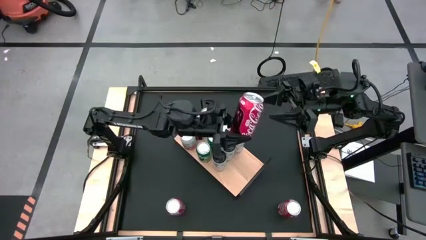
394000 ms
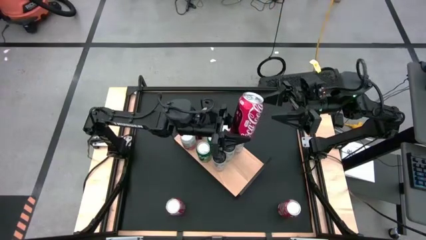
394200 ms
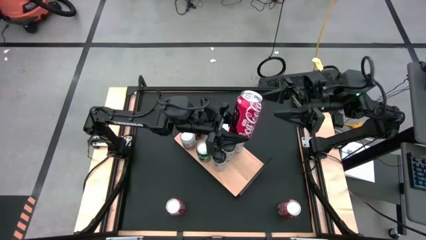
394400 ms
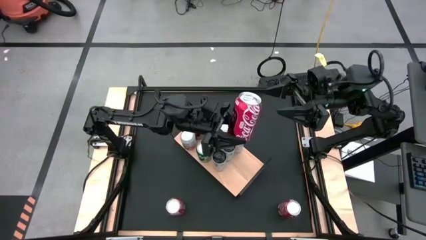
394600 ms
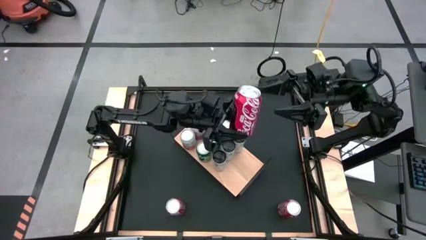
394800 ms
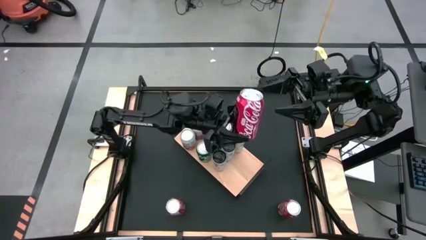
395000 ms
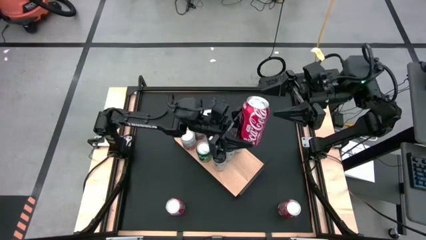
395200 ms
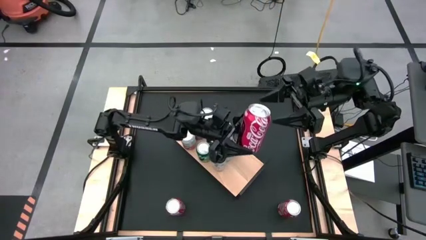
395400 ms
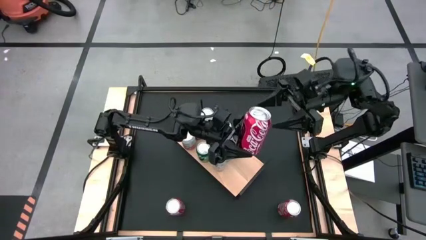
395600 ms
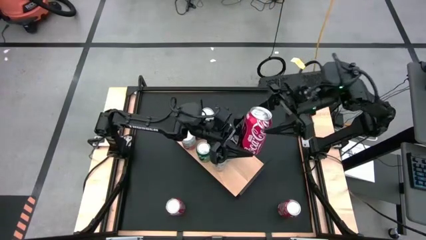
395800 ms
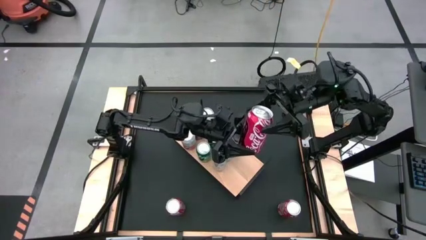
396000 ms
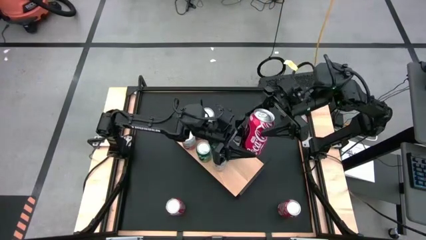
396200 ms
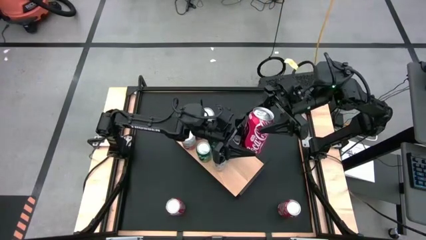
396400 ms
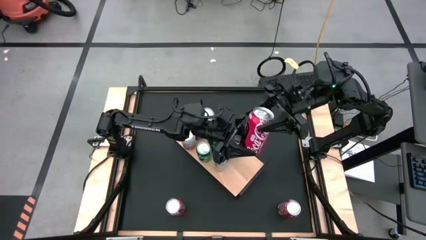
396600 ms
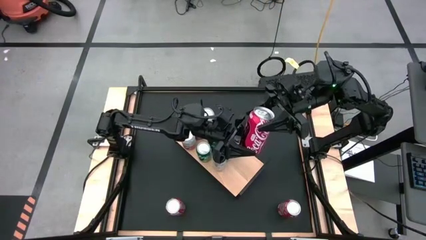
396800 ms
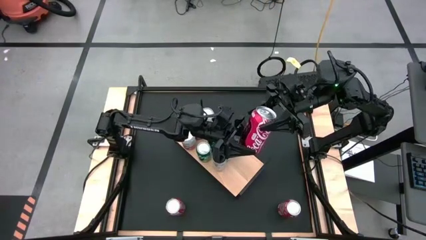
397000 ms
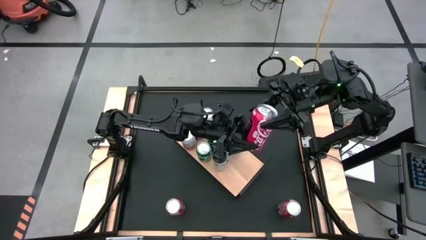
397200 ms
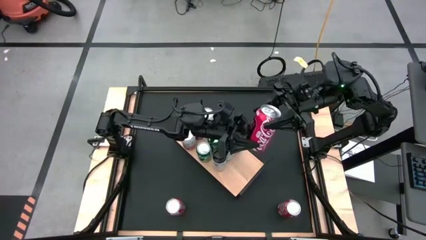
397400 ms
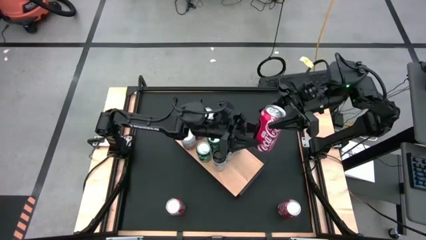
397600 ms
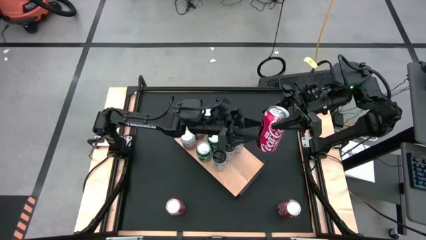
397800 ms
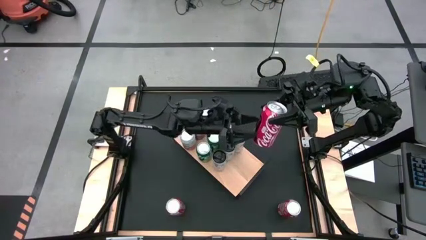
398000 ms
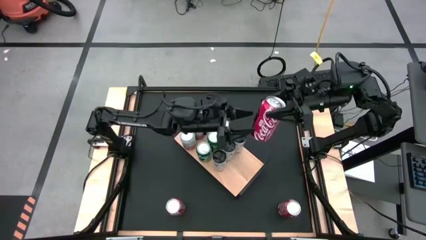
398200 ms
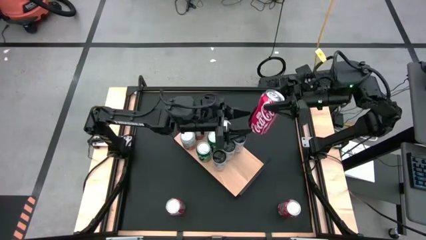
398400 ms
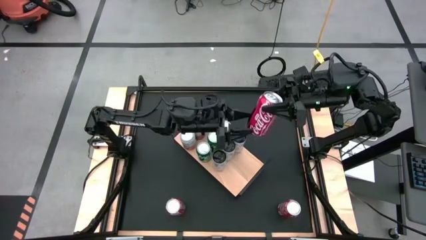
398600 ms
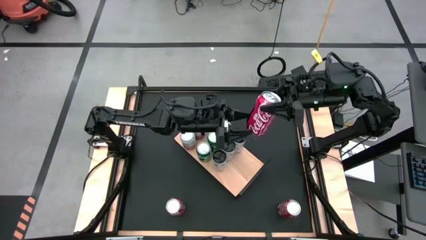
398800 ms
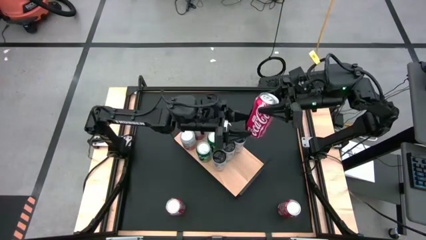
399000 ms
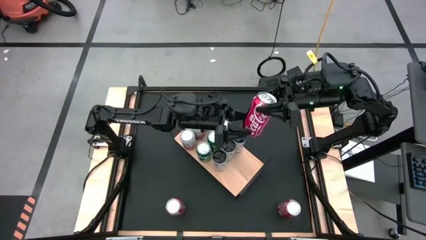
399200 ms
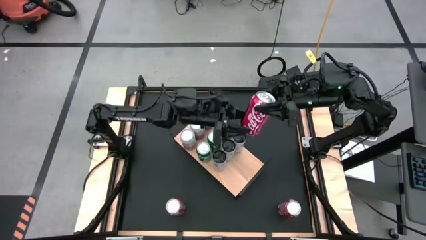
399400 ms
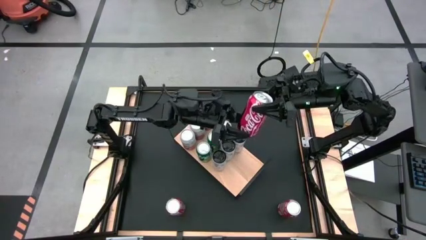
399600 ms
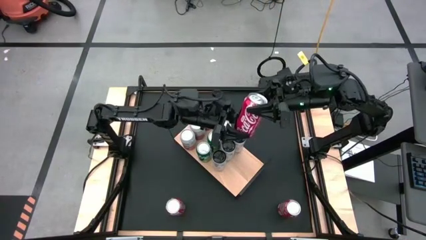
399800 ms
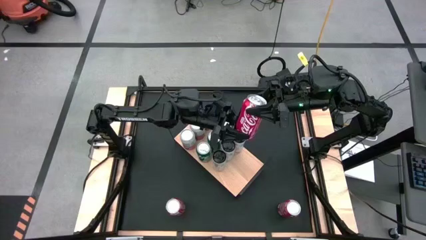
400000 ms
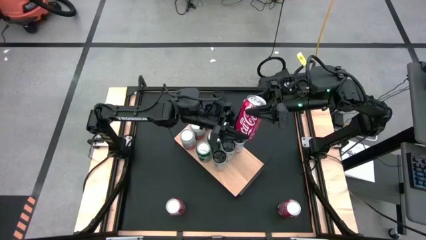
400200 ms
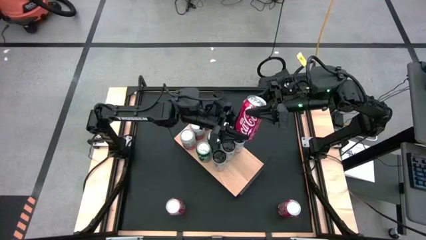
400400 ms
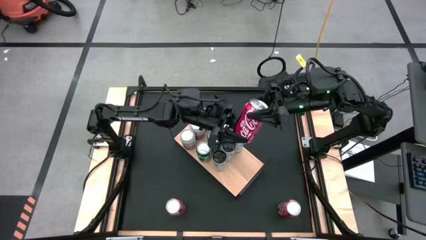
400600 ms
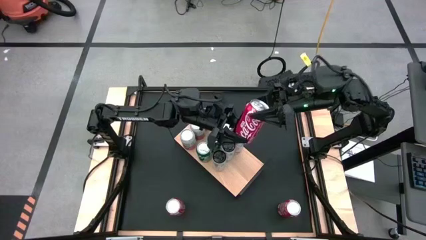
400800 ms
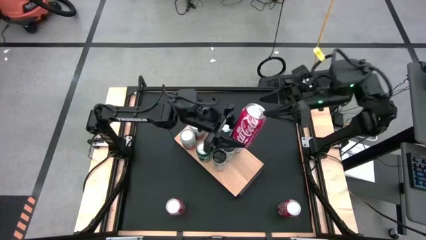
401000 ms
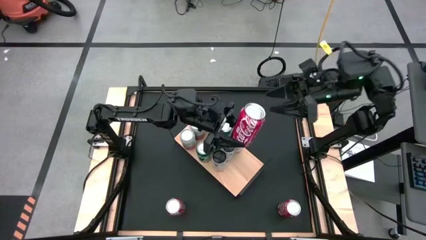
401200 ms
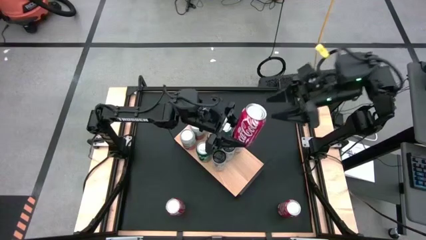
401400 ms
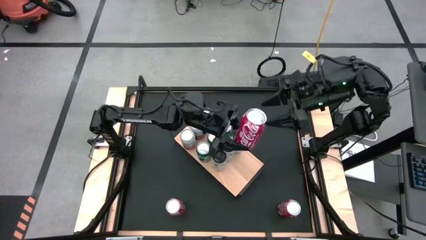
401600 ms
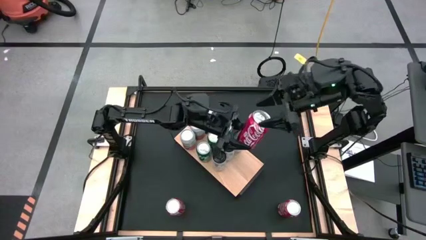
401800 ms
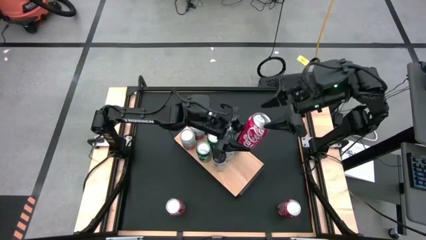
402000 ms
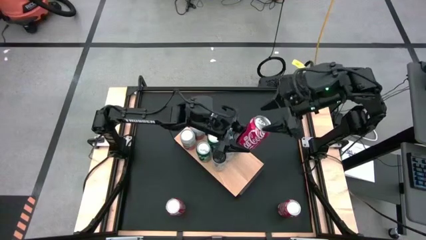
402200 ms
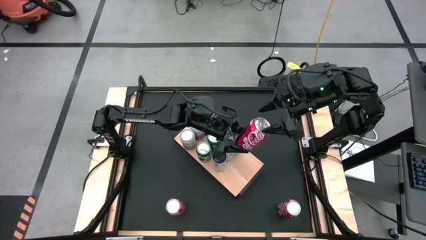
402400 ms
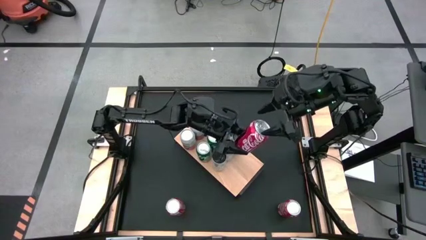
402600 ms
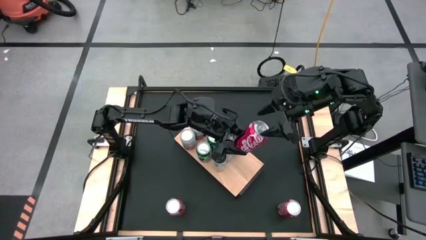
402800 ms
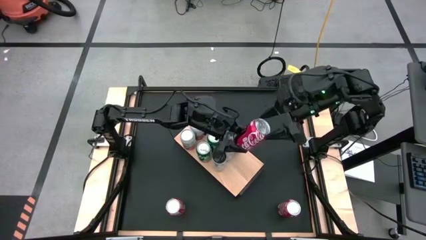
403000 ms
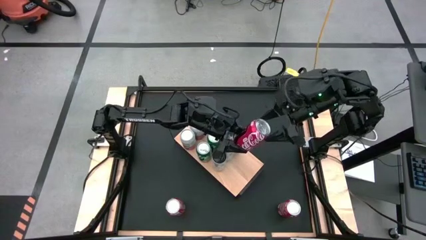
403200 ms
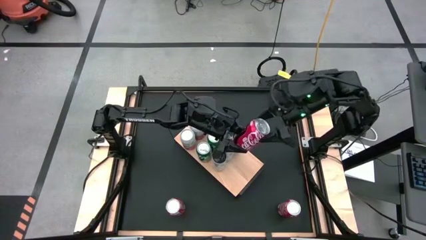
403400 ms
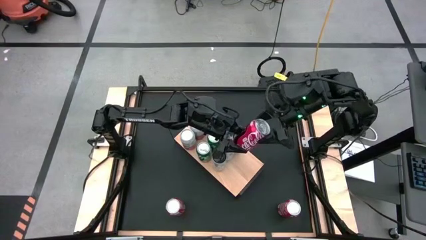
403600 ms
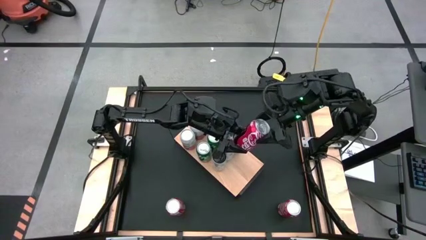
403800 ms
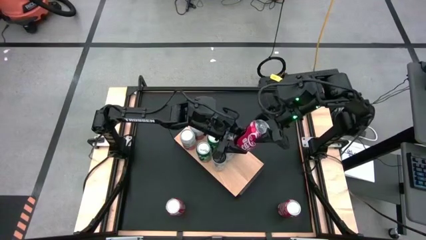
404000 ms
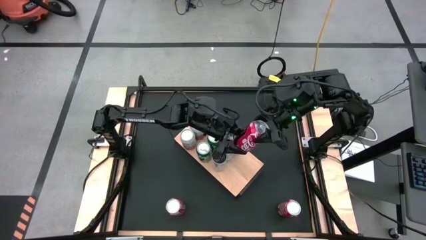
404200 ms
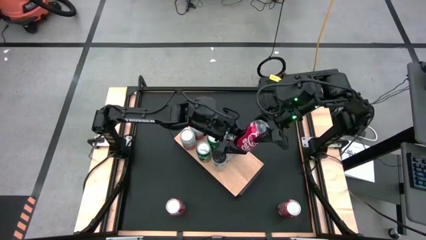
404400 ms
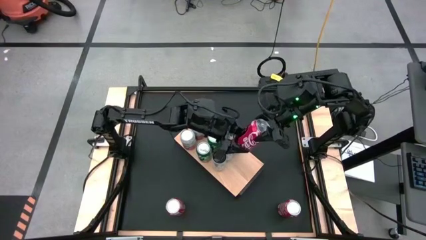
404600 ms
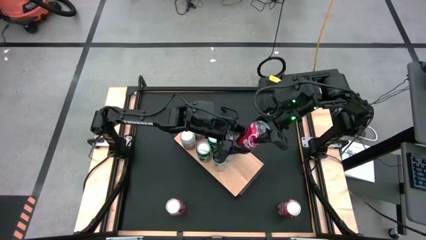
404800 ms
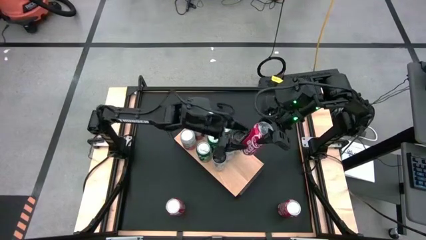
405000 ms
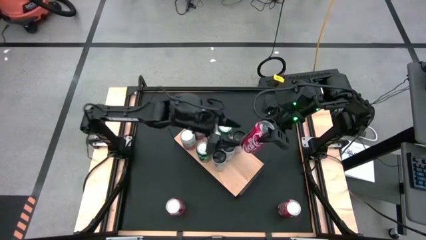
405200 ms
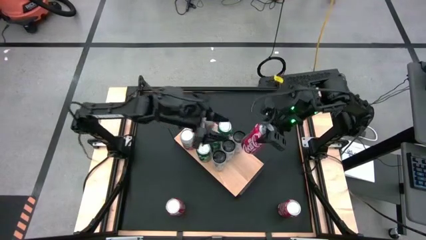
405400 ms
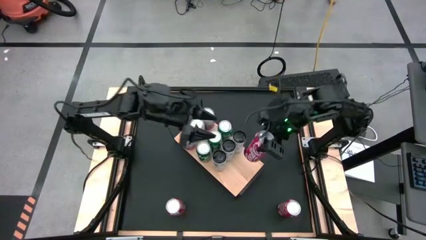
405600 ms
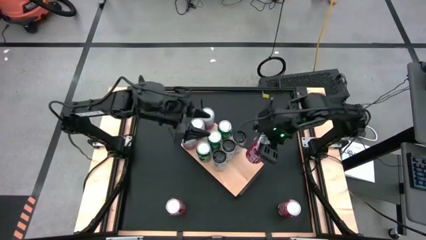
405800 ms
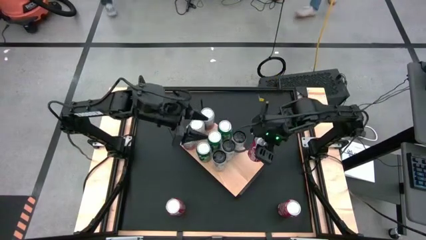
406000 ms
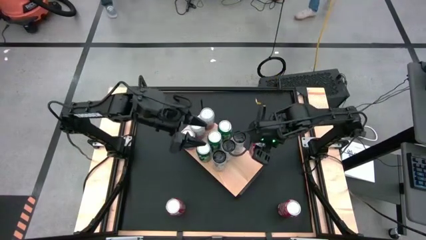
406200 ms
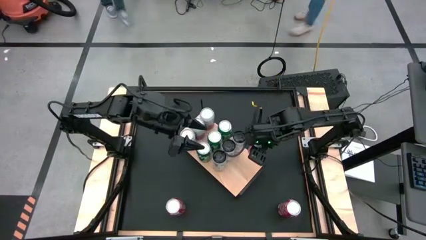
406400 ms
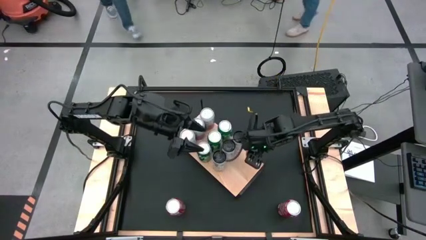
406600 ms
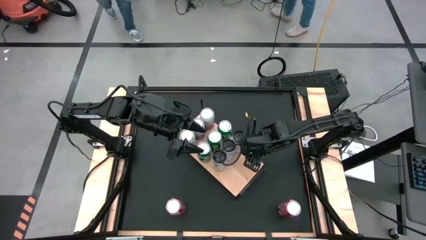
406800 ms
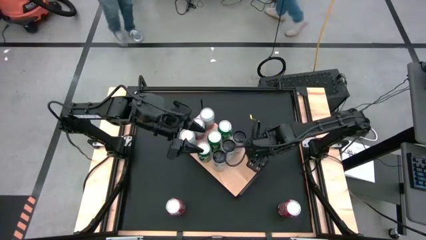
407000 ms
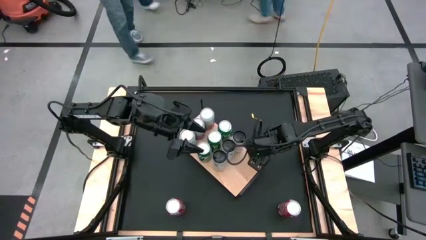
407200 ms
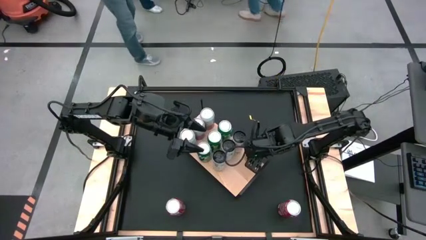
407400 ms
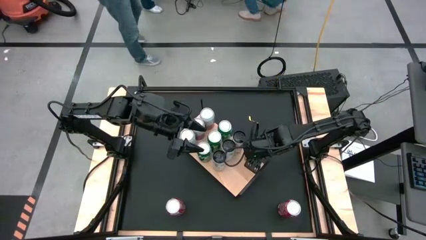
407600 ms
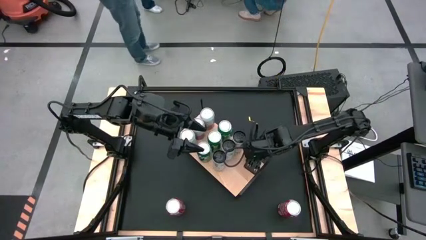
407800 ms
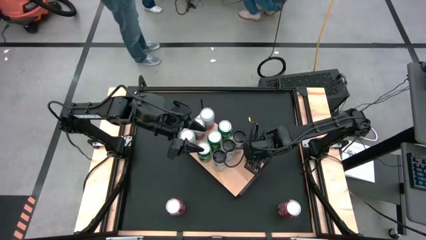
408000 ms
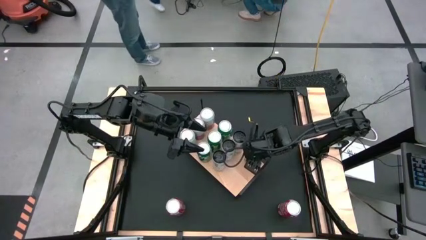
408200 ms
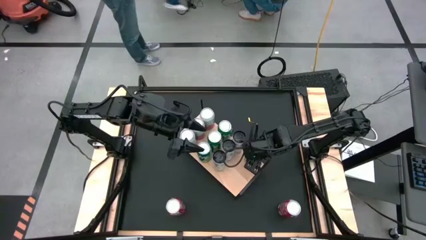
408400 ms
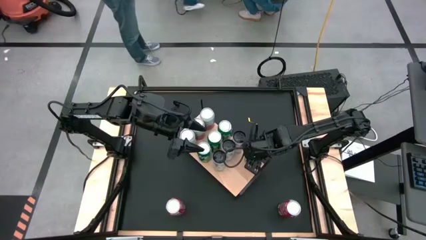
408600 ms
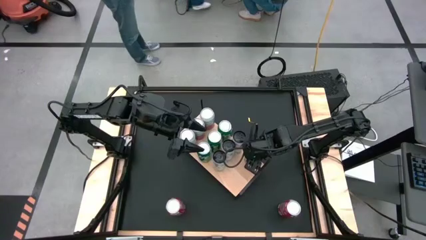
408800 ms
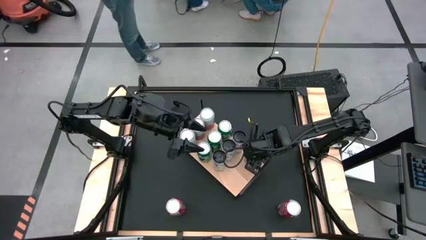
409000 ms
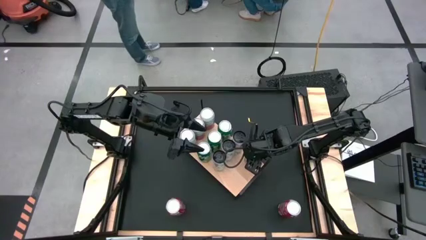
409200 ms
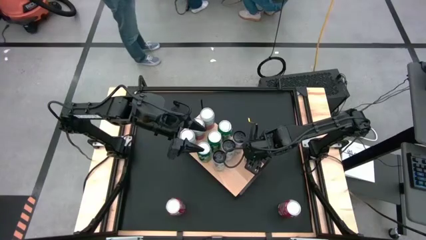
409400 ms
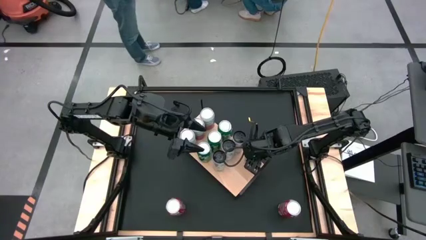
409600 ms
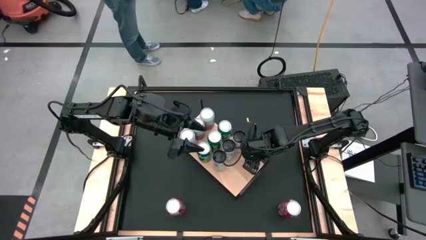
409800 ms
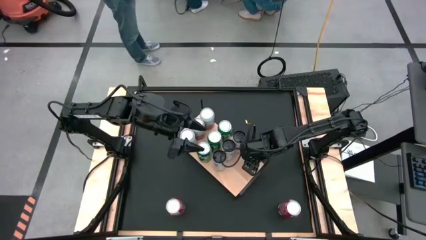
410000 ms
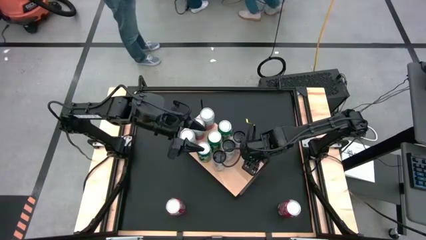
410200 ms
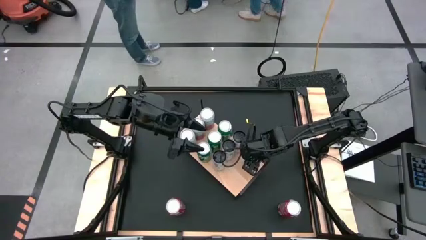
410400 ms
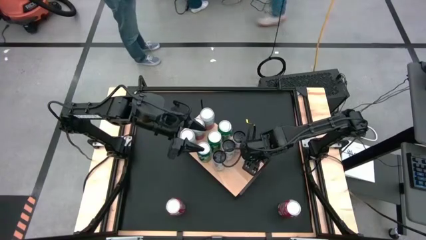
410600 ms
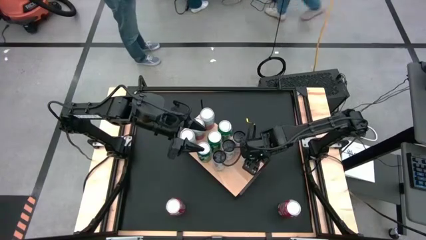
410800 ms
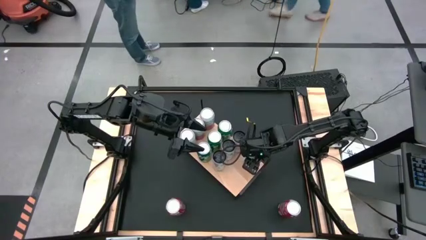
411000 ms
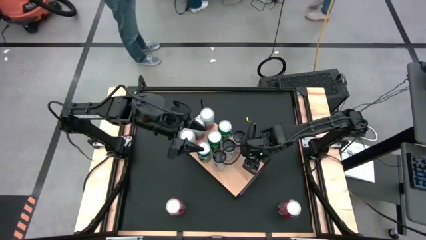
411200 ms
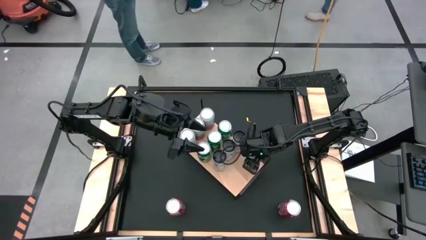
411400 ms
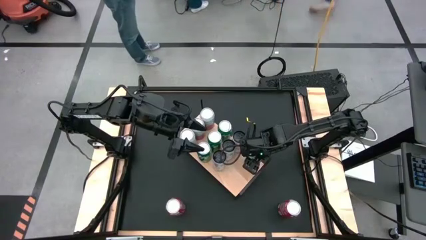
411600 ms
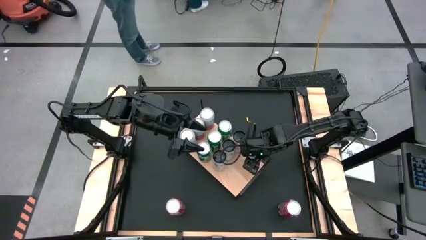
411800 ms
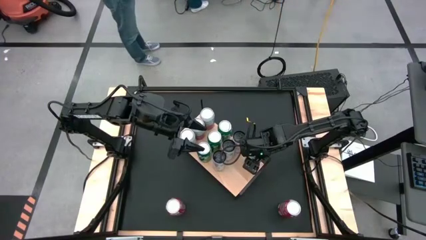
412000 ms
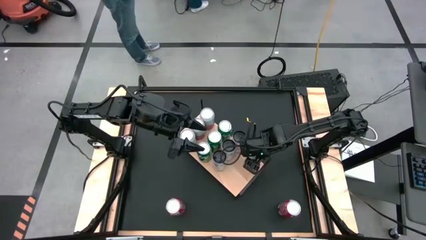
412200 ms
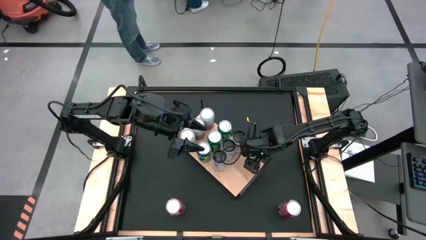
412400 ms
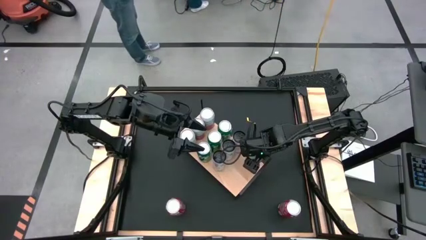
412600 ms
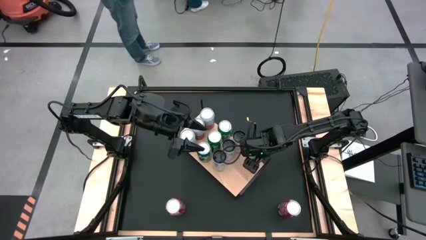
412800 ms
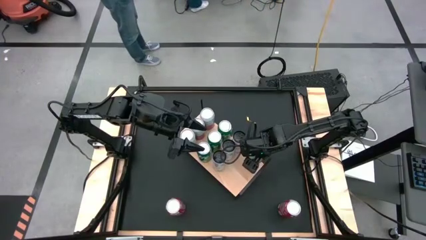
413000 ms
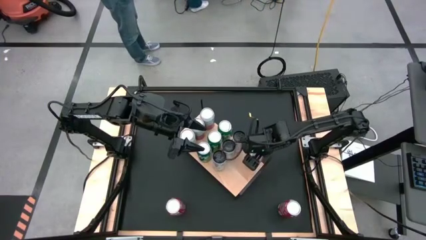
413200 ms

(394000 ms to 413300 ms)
Task: Place canned beverage on shelf
Put the top red soda can on the shelf
